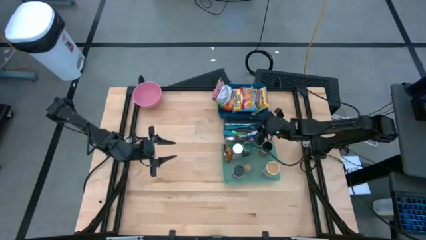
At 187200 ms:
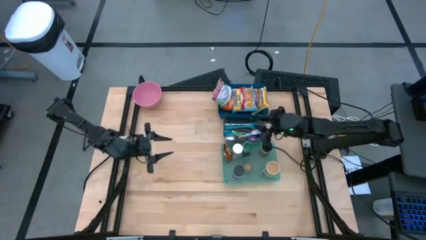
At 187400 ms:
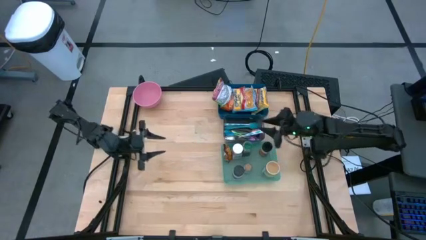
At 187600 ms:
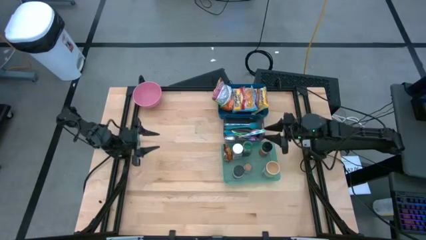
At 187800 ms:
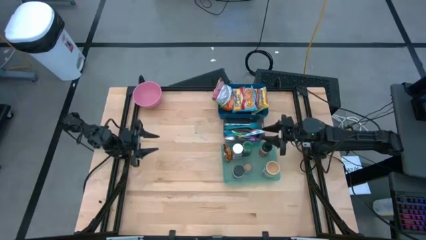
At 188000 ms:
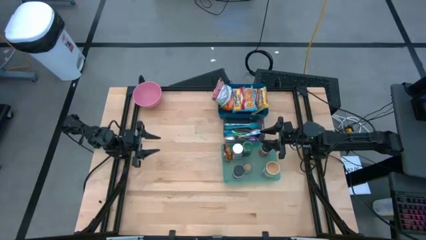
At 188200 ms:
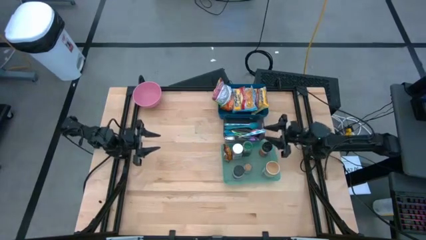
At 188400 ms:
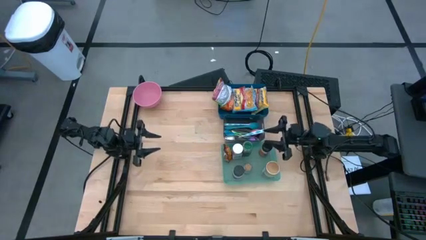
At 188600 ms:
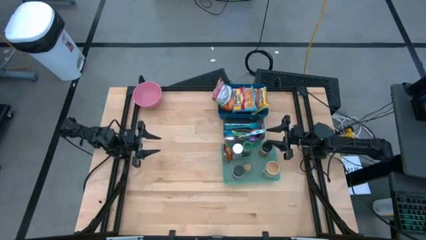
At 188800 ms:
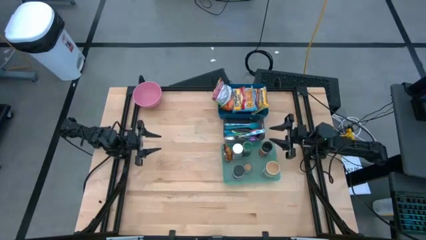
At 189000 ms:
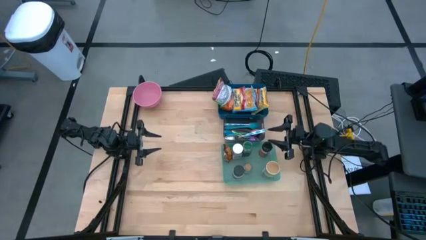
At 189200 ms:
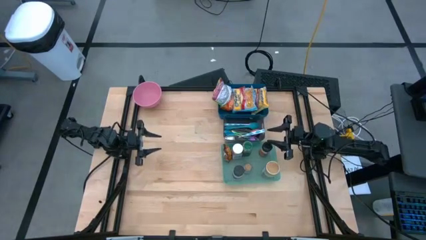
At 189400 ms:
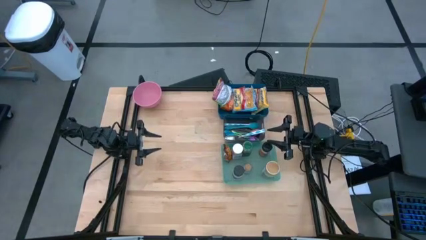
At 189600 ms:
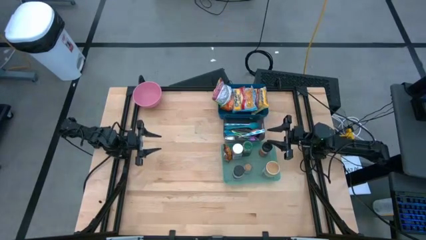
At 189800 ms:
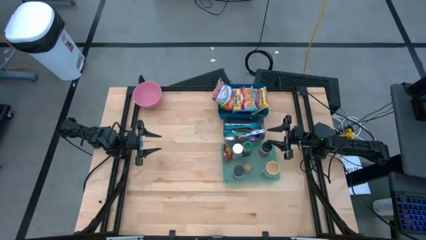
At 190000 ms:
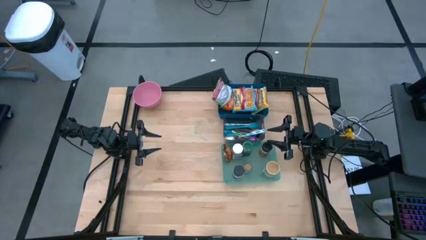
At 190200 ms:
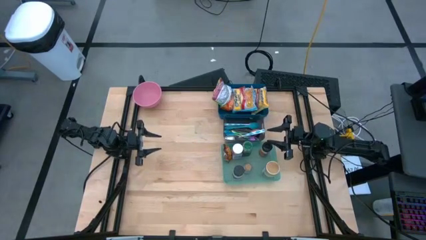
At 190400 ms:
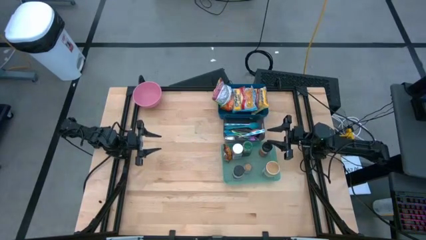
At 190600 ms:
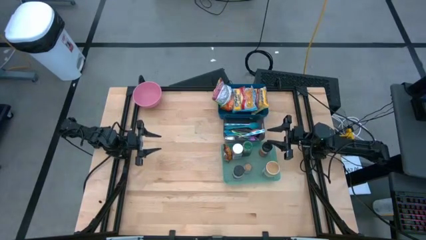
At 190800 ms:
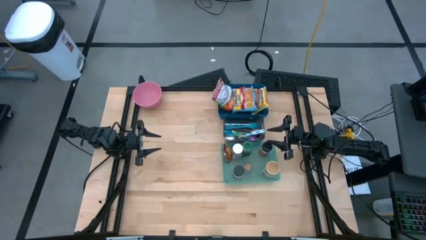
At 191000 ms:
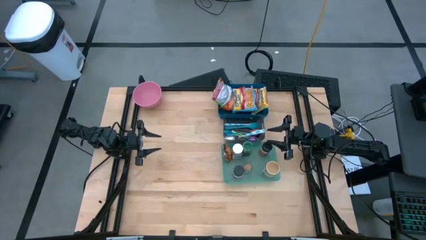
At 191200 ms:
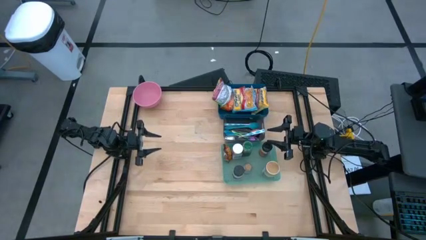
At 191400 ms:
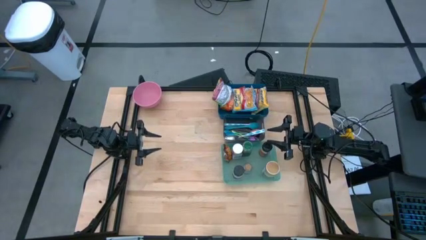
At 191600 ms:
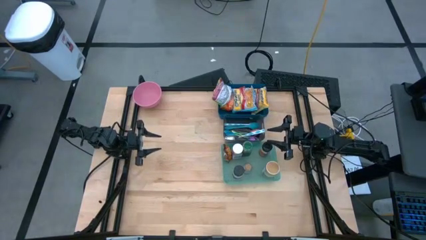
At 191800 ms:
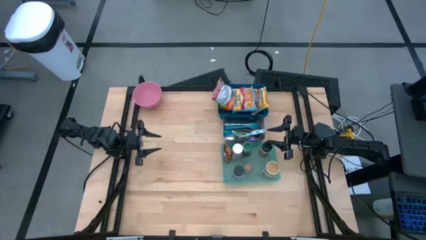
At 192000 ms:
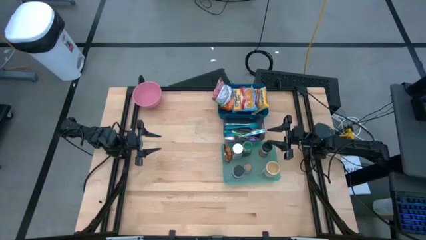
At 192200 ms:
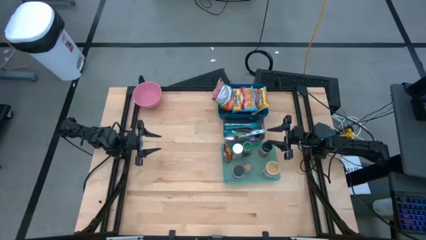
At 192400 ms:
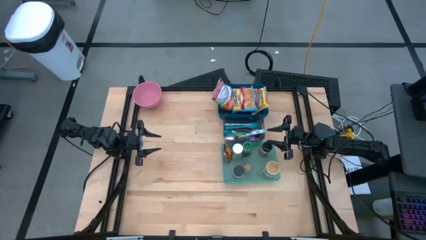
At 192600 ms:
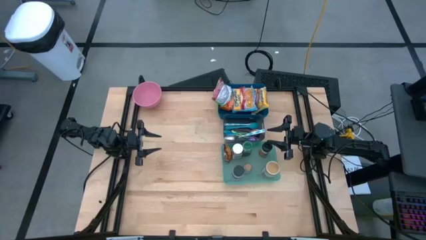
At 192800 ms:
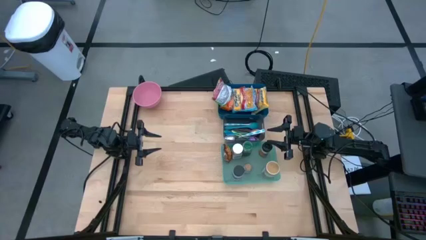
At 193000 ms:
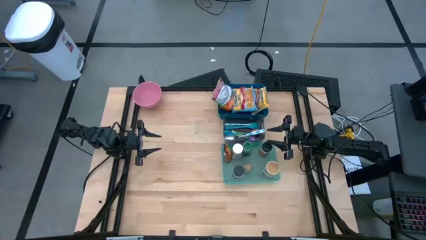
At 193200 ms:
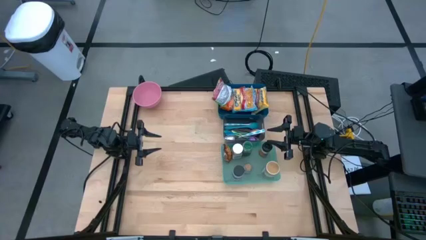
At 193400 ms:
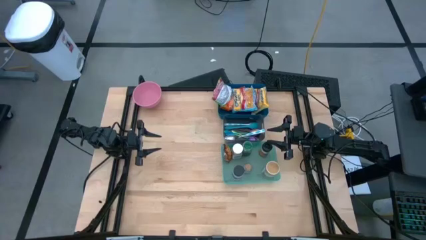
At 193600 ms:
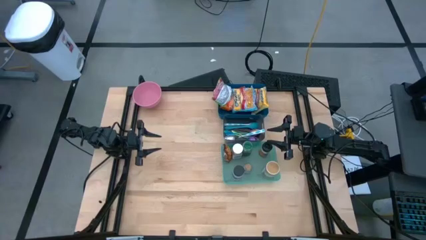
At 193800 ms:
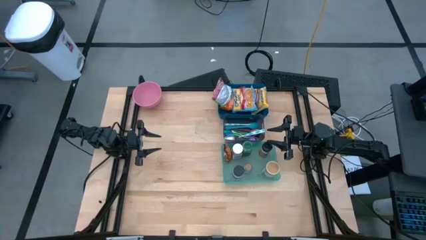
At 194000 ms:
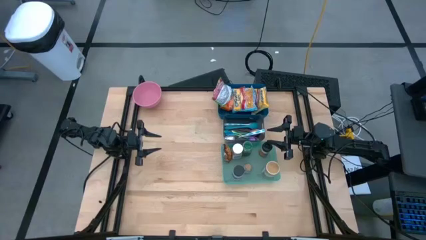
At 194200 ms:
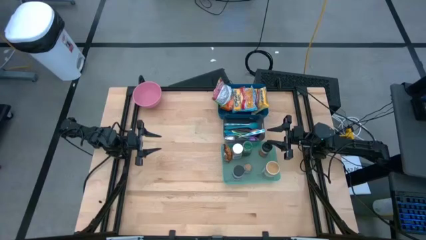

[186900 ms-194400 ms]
Task: Pick & Place Food Item
Return to Home Position

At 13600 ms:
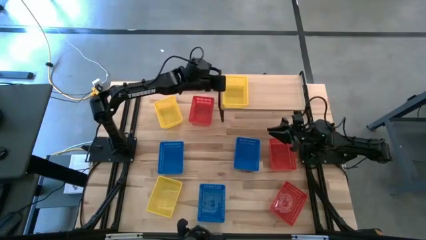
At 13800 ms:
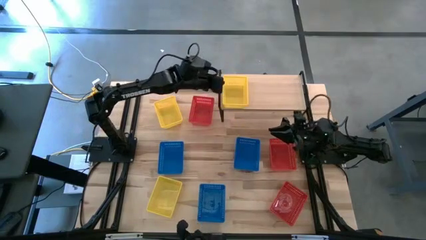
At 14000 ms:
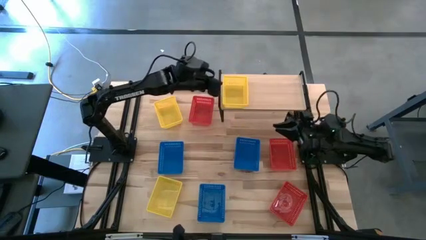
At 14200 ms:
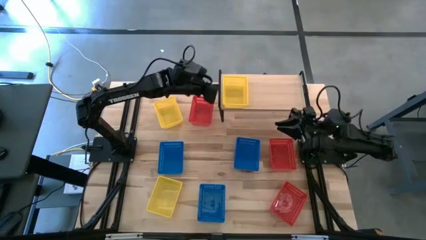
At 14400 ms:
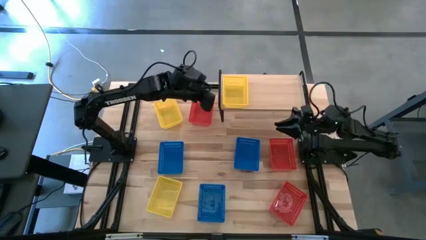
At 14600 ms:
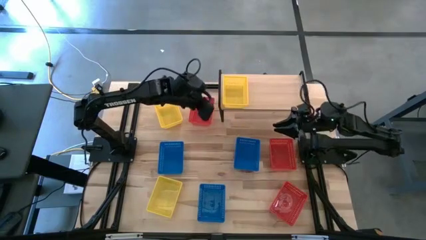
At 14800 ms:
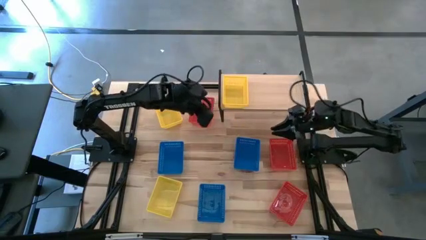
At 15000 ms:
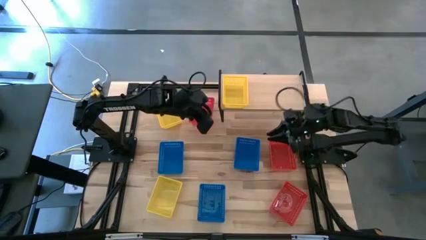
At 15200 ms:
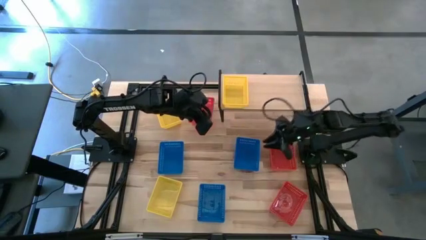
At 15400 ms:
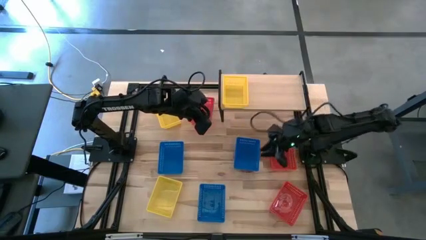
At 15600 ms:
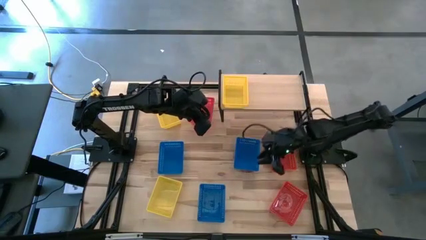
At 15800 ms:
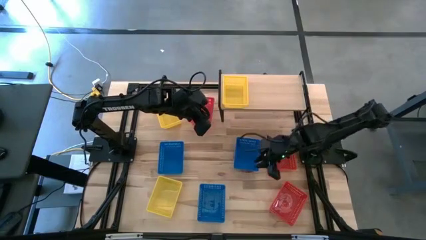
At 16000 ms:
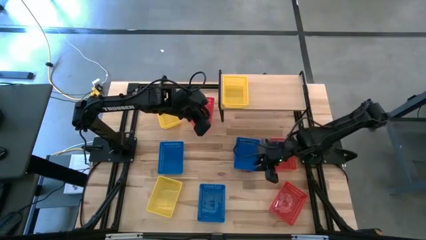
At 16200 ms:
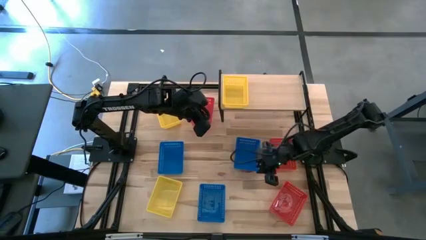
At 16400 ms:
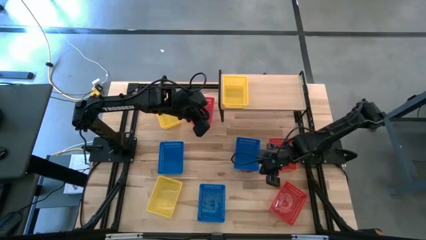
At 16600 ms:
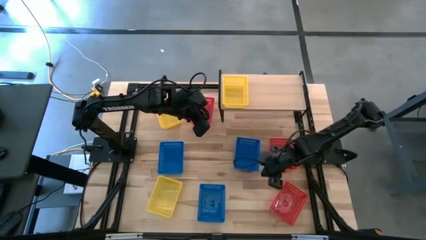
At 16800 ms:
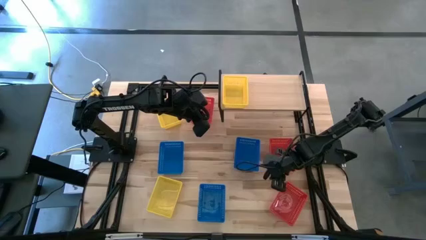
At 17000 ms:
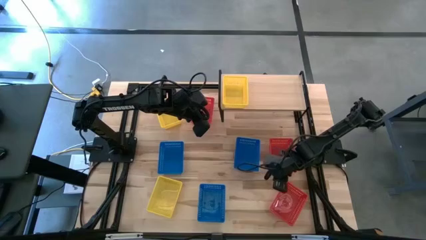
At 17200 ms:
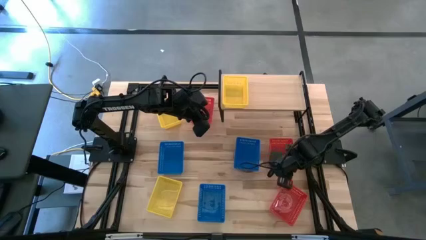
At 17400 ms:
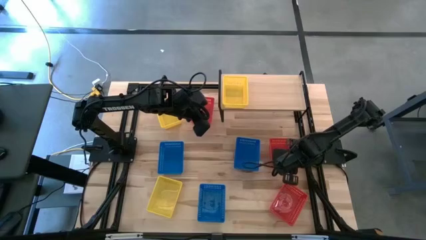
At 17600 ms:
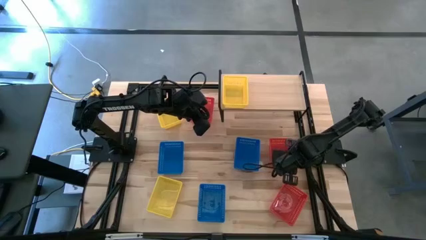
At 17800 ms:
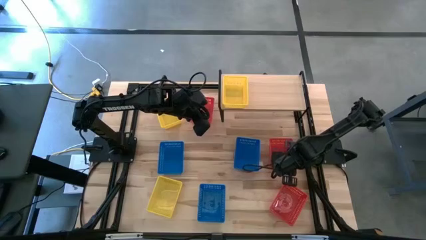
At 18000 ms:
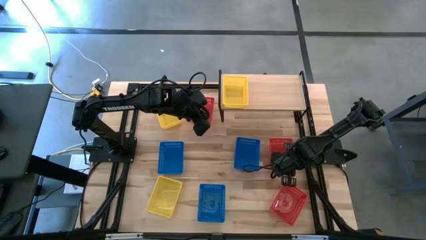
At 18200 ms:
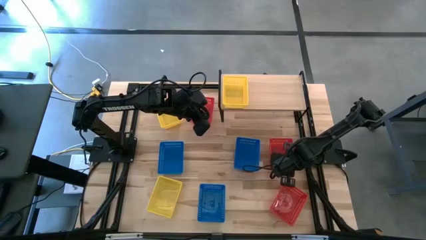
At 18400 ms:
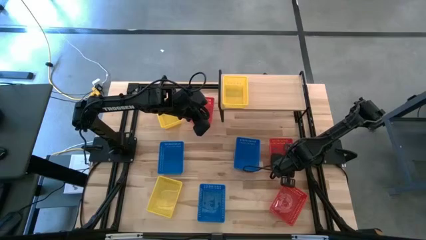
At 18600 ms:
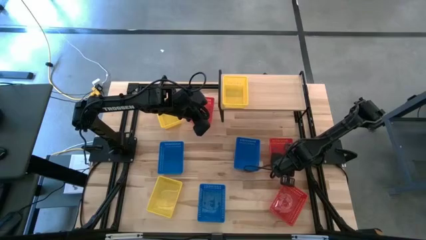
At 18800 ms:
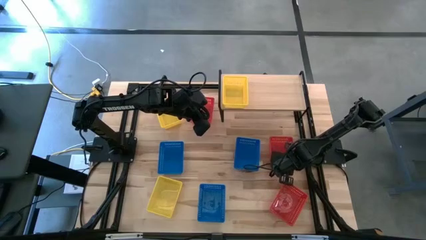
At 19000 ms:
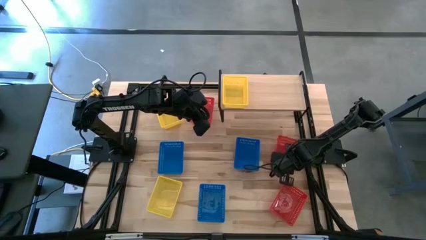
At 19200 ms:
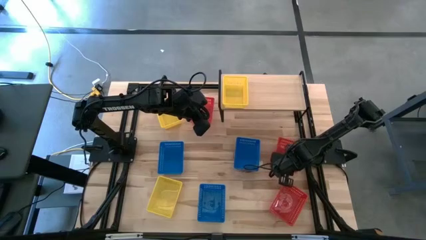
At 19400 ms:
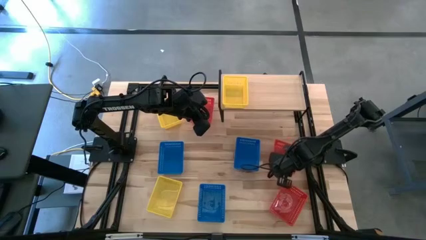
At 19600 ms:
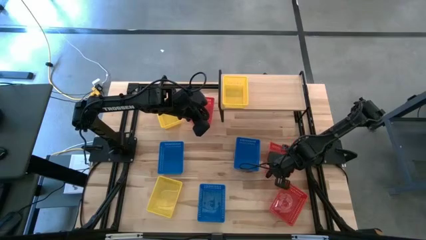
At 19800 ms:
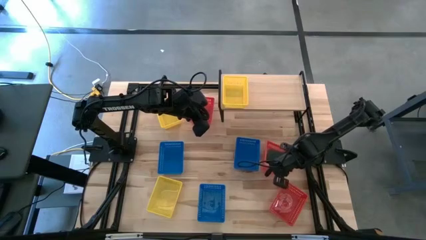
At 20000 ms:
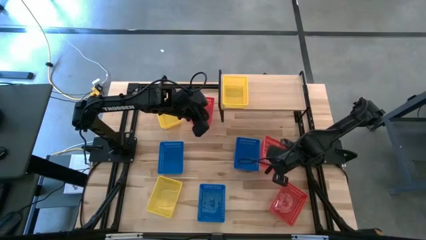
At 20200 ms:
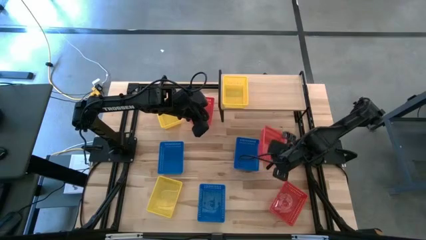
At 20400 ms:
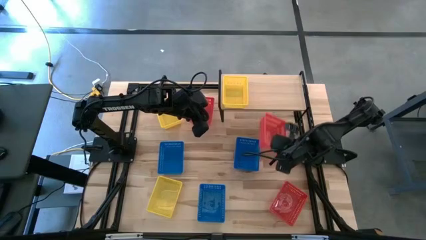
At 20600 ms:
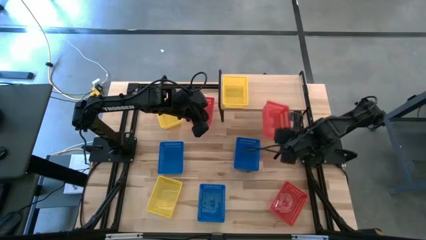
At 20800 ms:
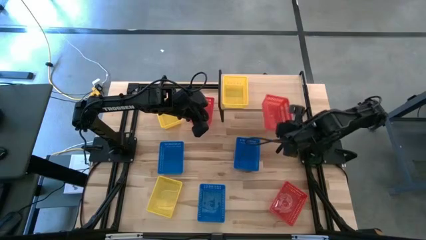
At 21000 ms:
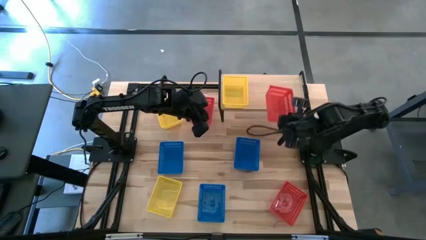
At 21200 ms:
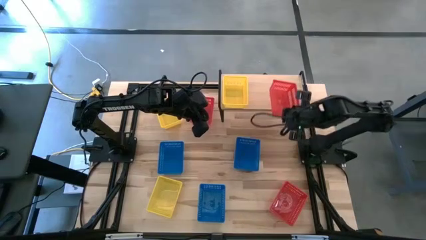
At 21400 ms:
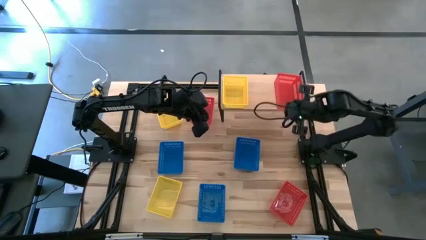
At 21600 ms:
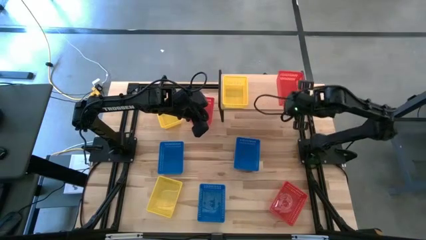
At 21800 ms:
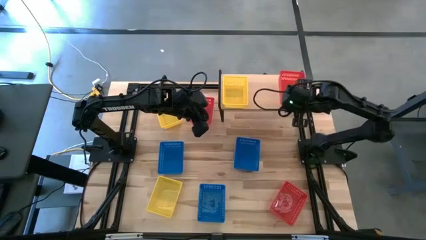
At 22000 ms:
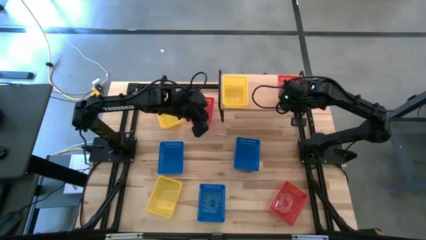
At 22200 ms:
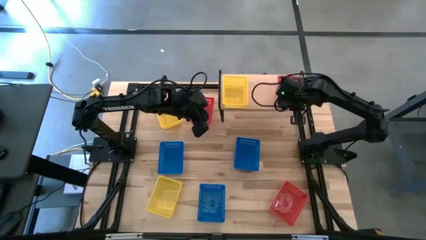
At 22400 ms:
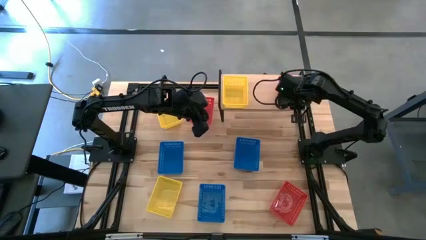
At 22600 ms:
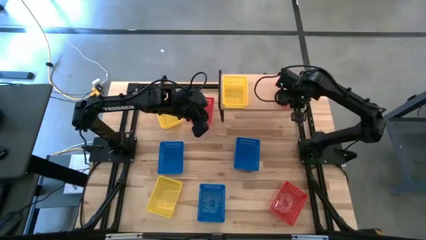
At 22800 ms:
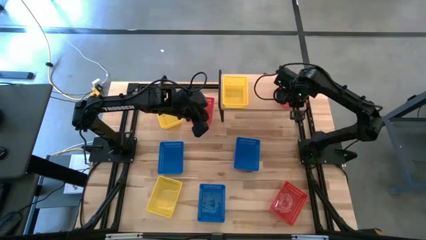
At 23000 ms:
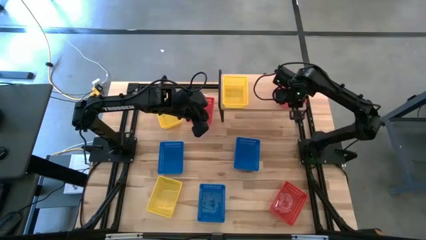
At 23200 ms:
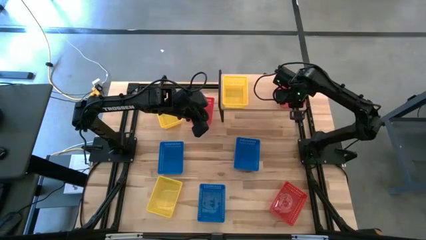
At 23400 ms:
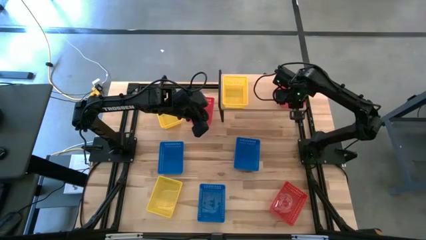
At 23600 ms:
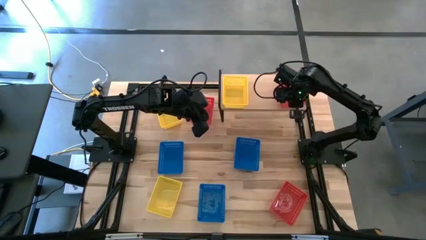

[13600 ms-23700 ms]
Task: Stack baskets on shelf by color
Put the middle right red bin on the shelf
